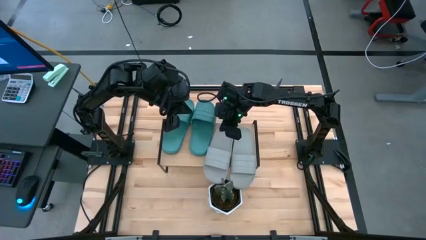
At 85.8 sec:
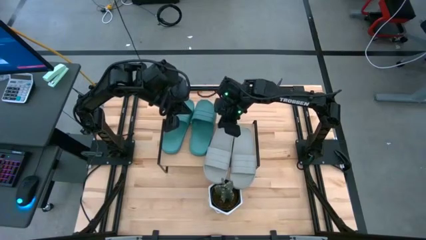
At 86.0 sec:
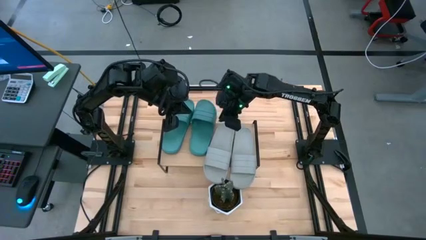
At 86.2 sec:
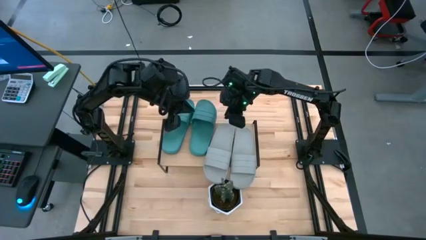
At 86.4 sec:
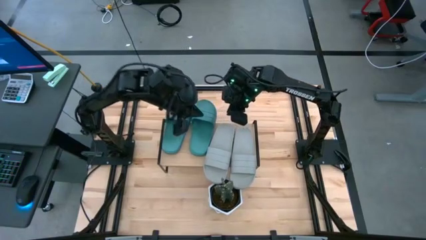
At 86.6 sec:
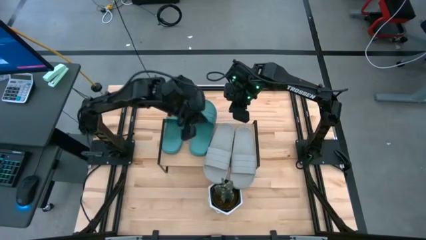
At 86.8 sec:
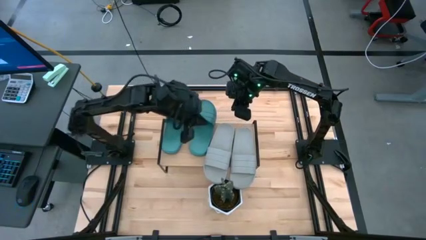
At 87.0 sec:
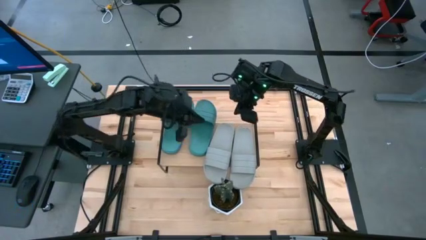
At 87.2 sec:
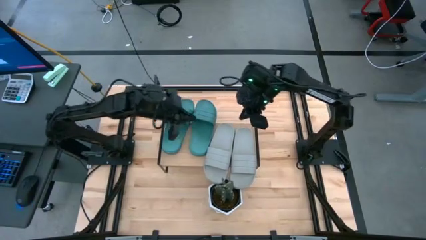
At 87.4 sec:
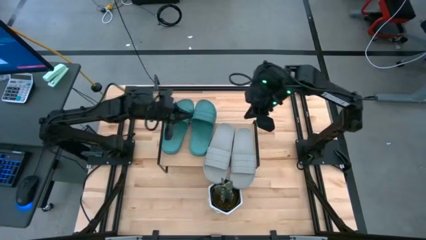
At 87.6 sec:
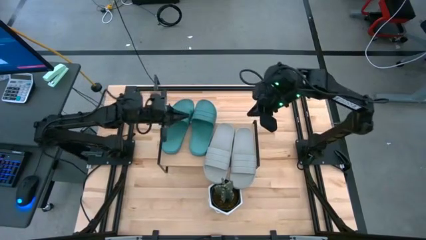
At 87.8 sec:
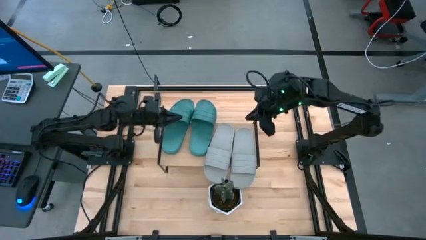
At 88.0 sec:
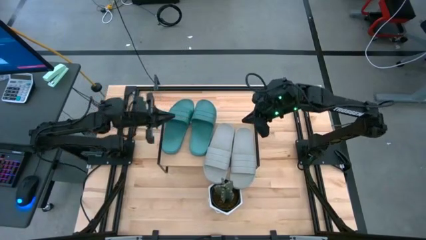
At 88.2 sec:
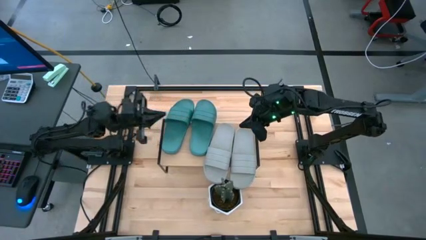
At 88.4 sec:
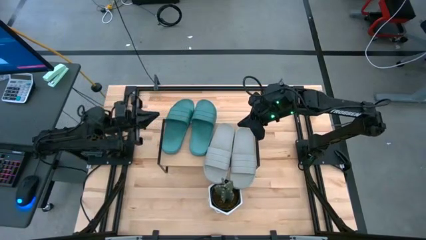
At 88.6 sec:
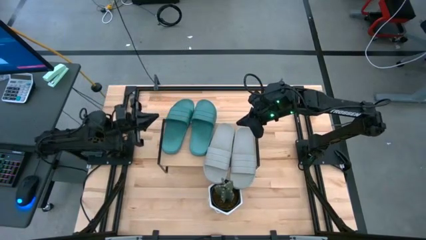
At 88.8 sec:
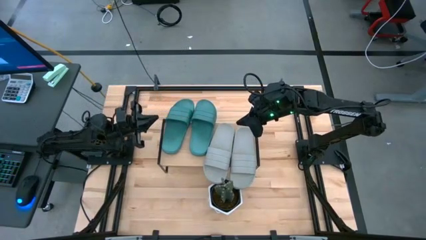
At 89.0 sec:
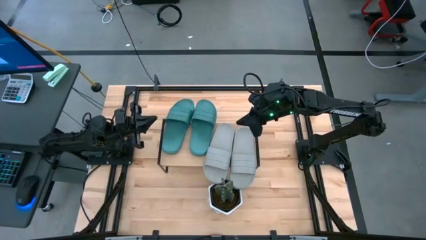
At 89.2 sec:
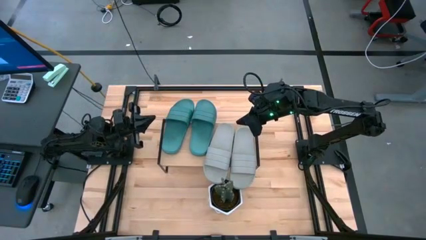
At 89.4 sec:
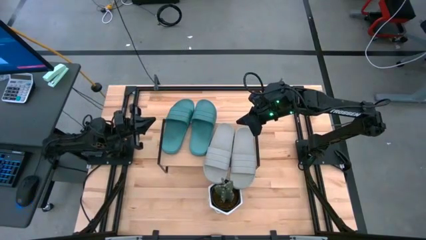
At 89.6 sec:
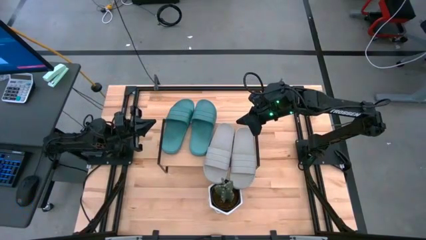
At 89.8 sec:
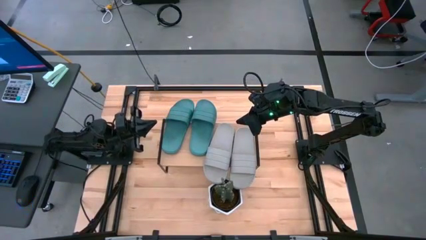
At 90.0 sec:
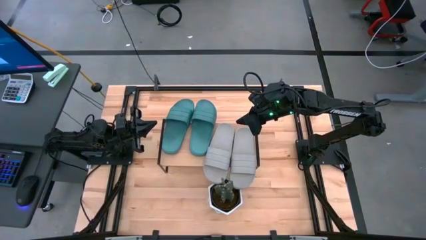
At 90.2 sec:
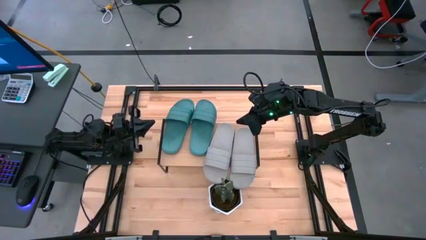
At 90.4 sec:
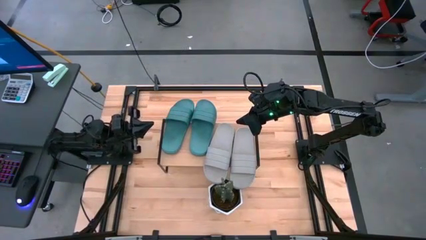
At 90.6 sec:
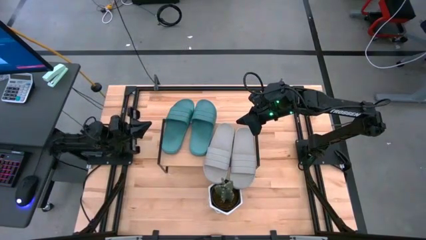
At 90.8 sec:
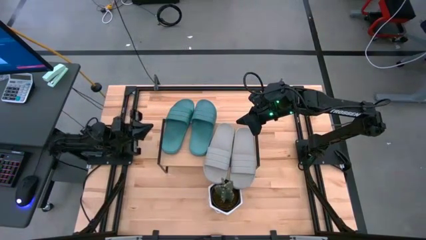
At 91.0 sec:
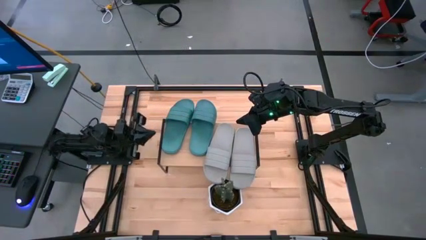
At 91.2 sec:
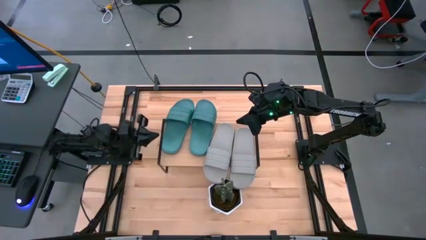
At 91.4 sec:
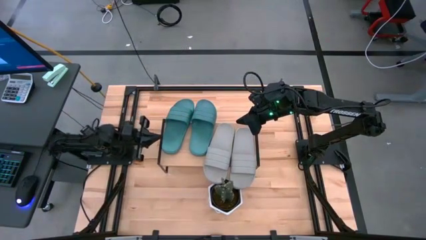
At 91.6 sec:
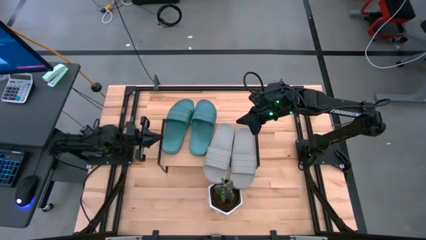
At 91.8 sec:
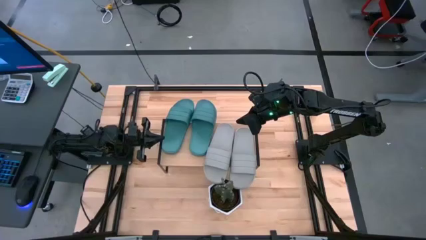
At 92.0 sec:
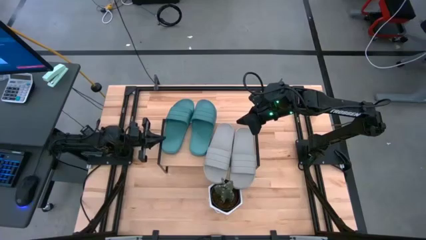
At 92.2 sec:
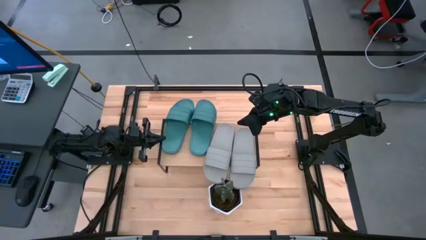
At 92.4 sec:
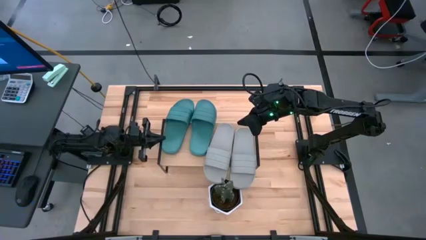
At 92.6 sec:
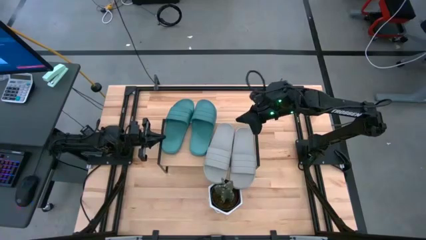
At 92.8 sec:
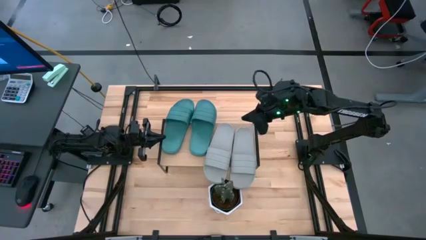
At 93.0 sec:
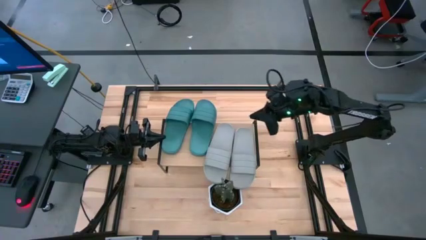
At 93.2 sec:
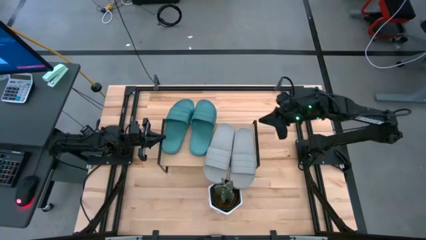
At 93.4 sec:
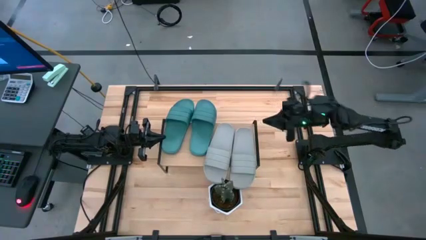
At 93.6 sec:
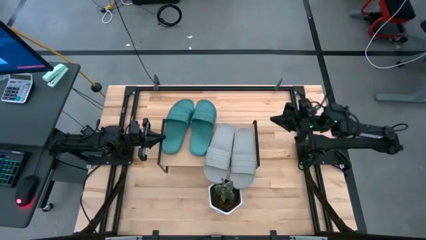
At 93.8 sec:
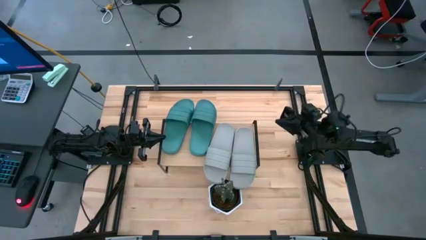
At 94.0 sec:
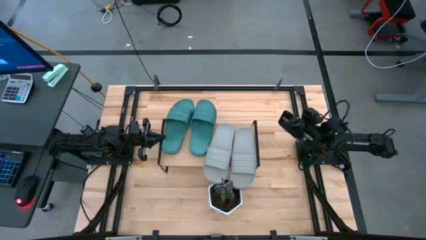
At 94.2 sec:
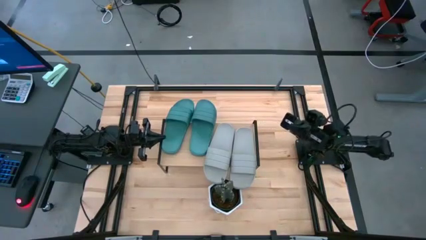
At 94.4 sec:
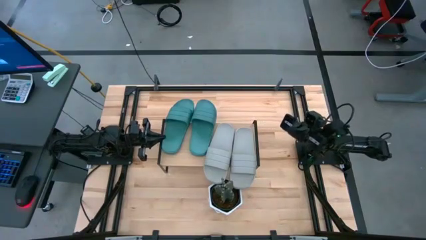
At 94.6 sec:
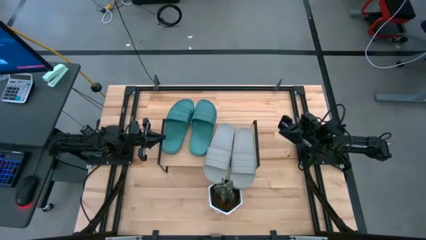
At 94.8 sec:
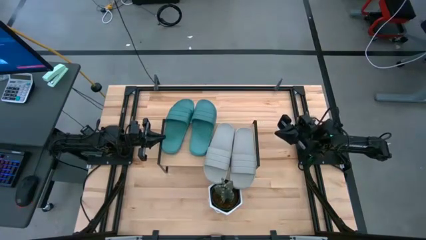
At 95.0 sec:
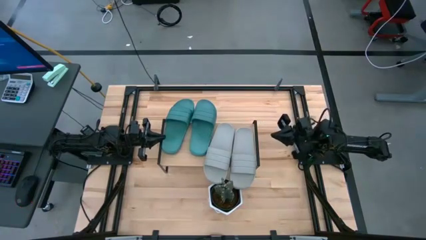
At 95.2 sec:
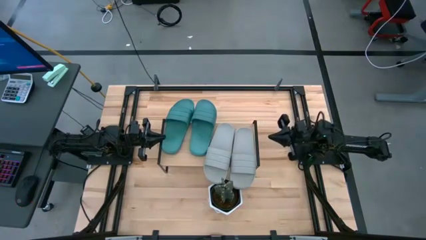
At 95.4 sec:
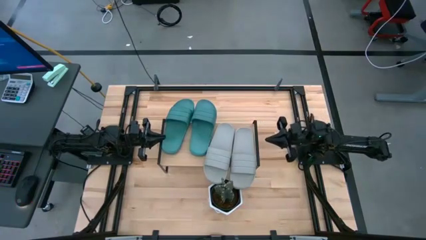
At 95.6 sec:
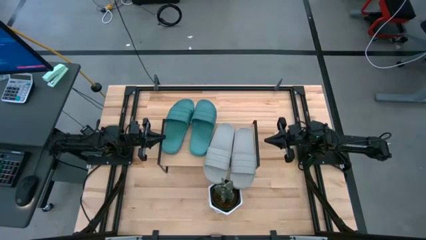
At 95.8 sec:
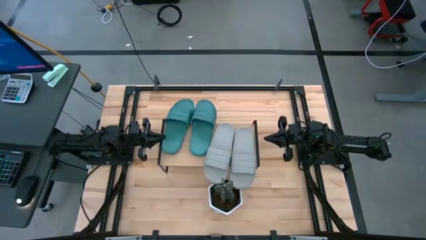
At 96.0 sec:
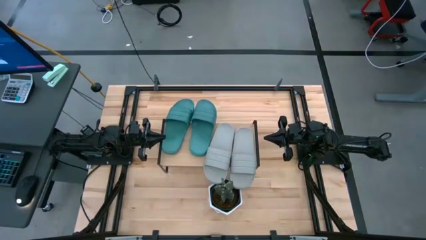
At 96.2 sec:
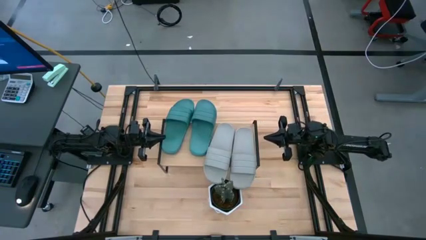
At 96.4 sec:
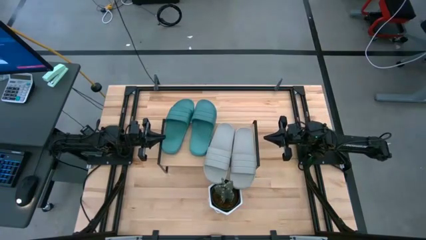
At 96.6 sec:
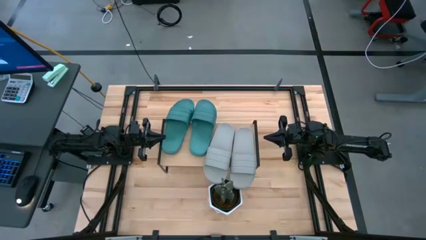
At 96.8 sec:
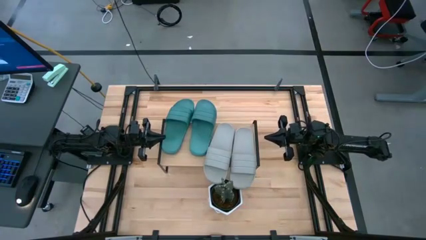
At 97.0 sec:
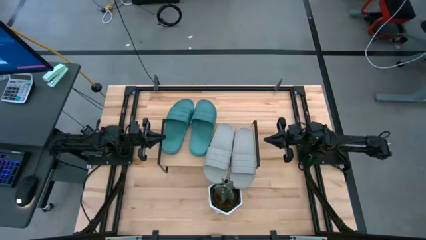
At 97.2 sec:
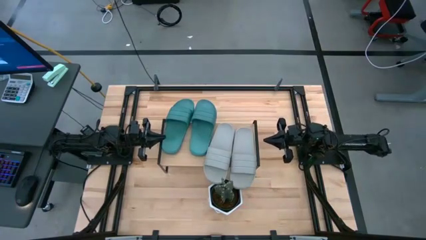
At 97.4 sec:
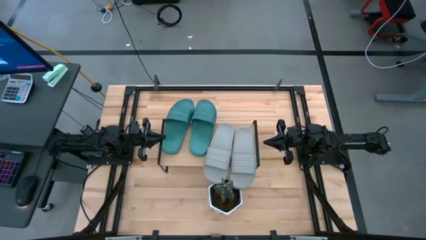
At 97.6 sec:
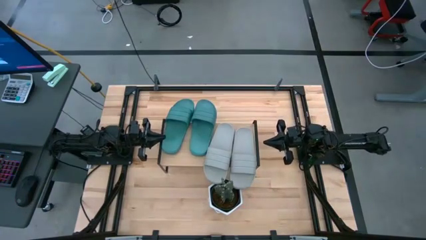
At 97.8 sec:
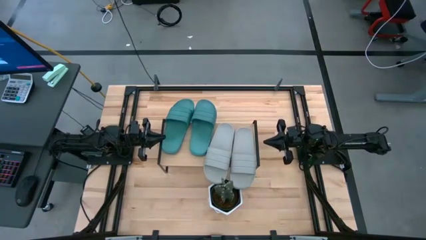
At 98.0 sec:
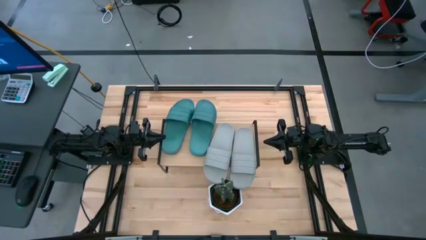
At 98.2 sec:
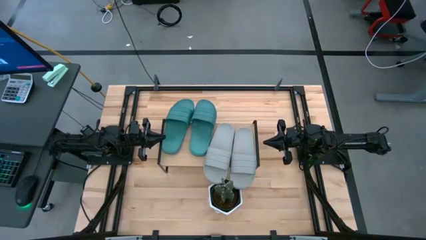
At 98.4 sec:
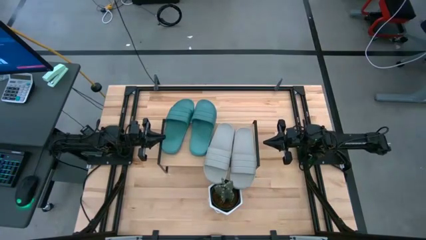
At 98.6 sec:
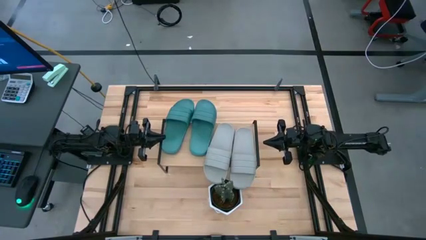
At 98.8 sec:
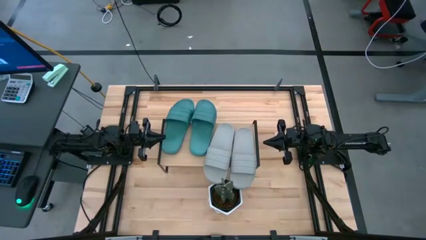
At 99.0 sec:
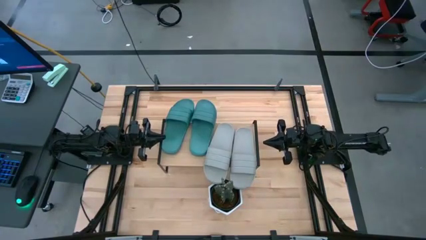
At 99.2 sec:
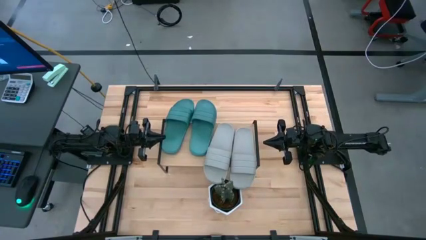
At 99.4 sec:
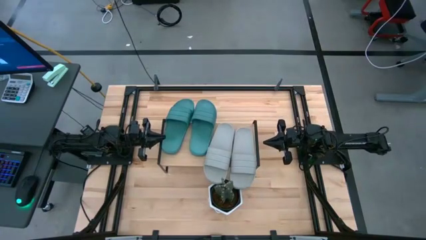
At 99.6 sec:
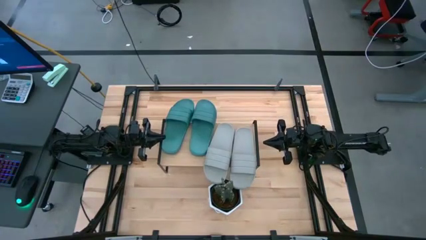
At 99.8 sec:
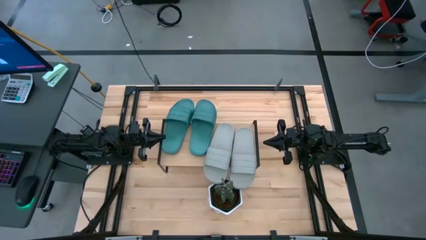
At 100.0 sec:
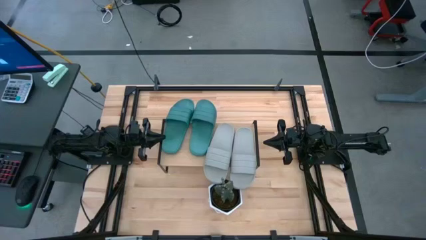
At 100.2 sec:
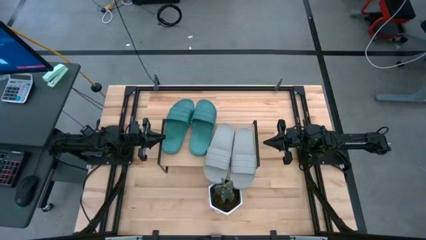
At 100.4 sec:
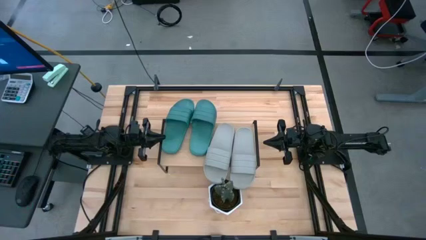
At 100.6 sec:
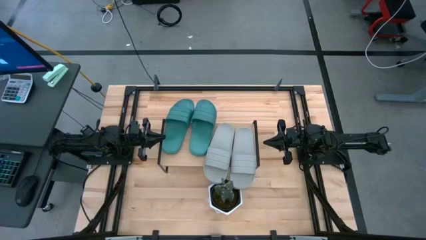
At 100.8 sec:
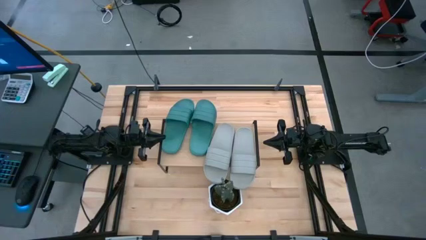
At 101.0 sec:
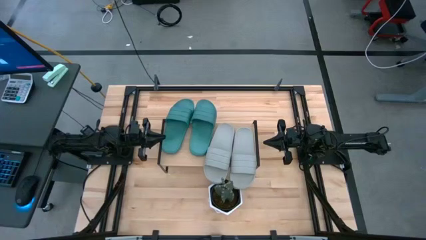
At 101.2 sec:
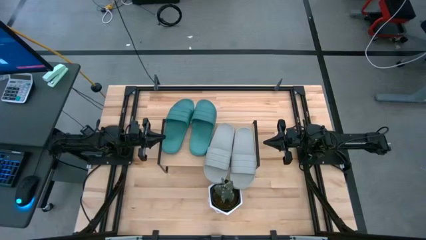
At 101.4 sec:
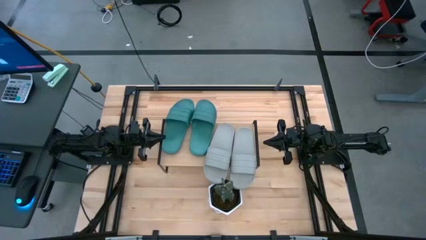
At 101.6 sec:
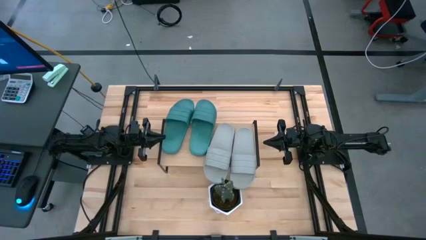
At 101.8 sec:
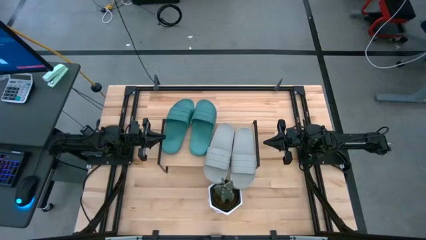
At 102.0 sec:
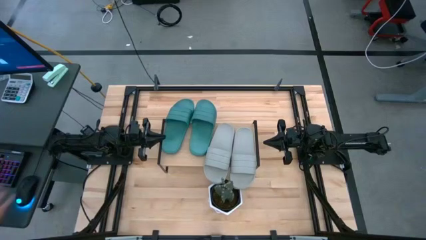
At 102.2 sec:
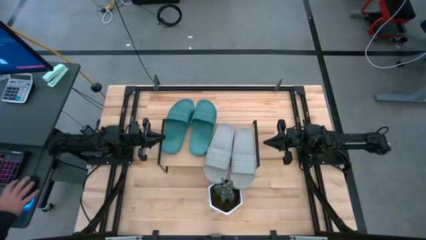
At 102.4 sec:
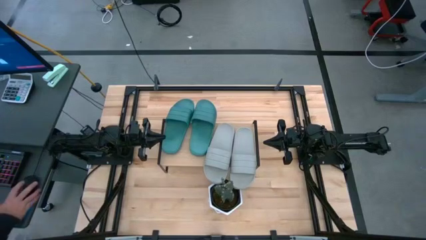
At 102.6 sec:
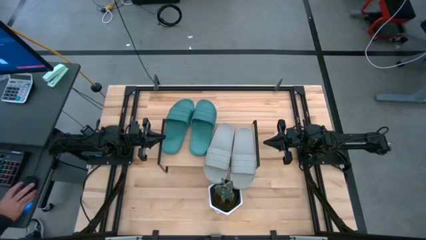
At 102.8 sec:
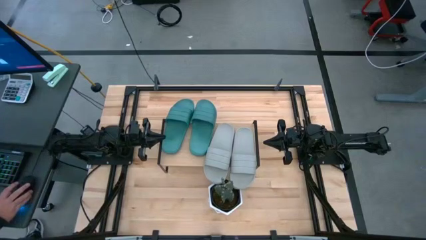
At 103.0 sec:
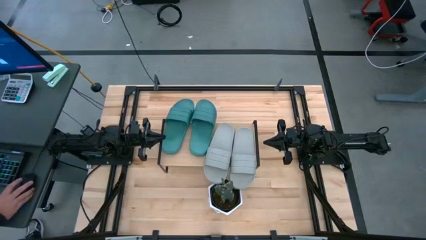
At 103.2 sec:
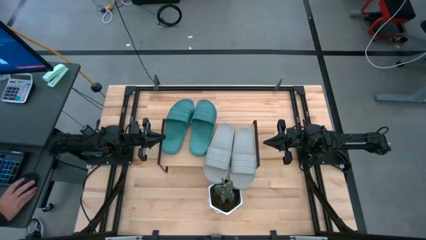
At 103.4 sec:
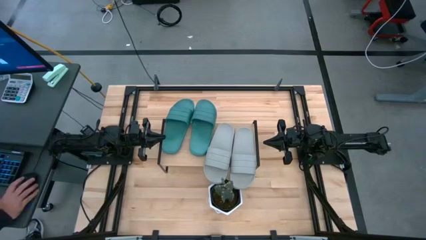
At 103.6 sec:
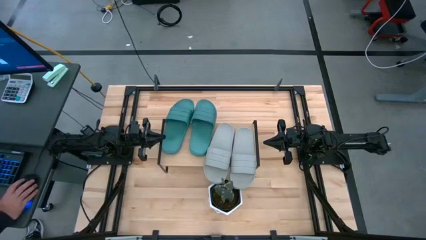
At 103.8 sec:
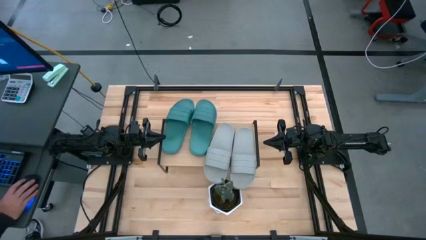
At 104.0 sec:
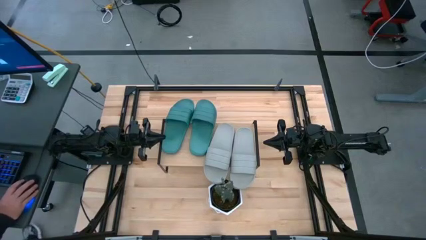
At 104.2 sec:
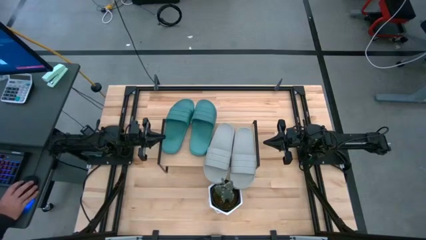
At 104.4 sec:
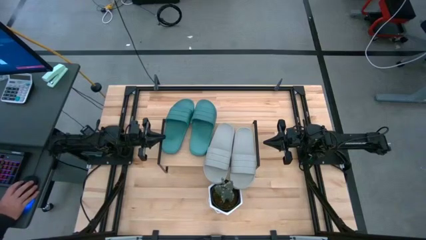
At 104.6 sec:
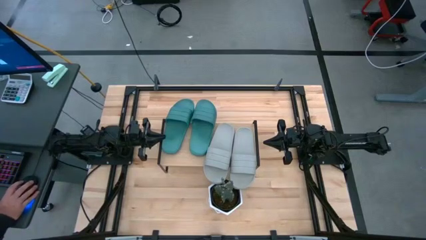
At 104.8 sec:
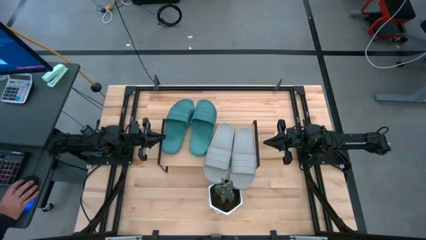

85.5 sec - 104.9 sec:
Task: Pick and place slides into the shelf
Return to Home Position
